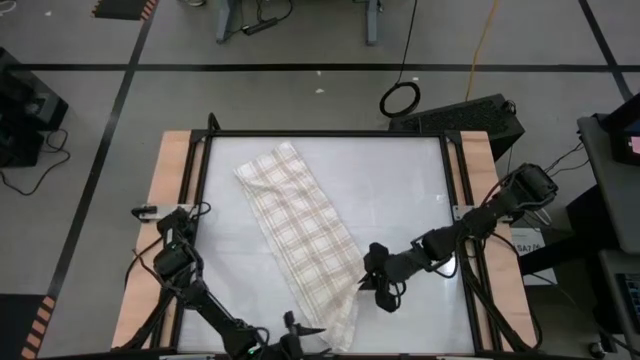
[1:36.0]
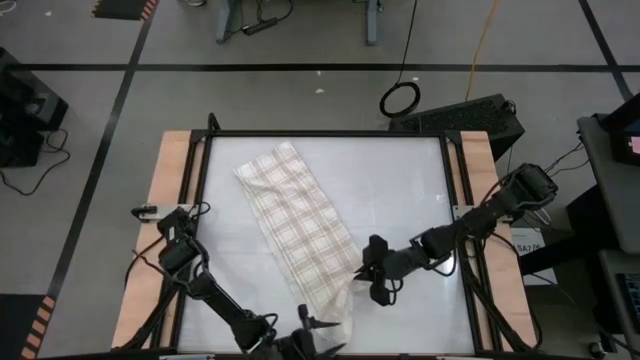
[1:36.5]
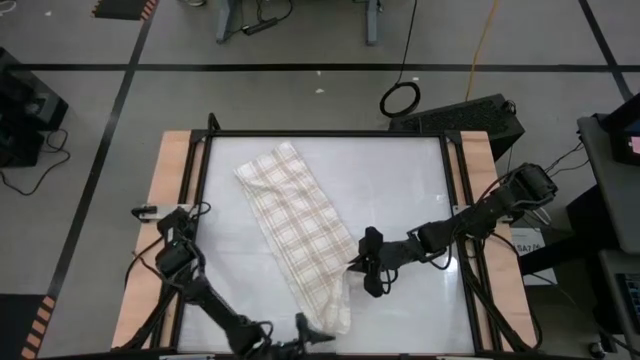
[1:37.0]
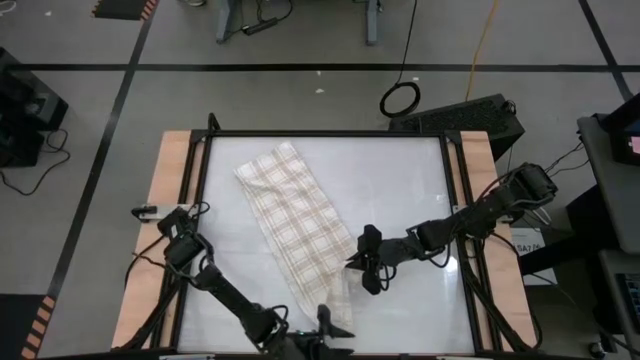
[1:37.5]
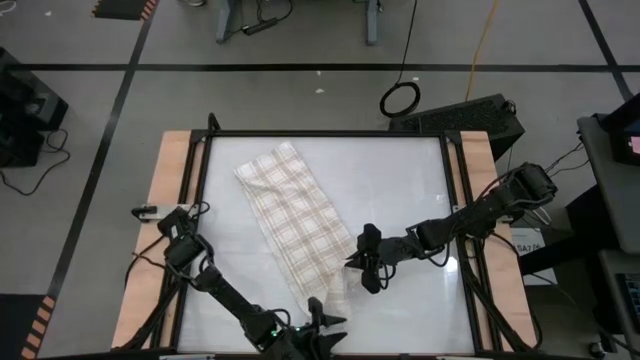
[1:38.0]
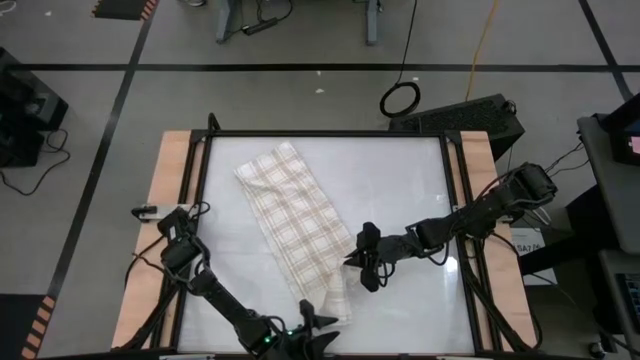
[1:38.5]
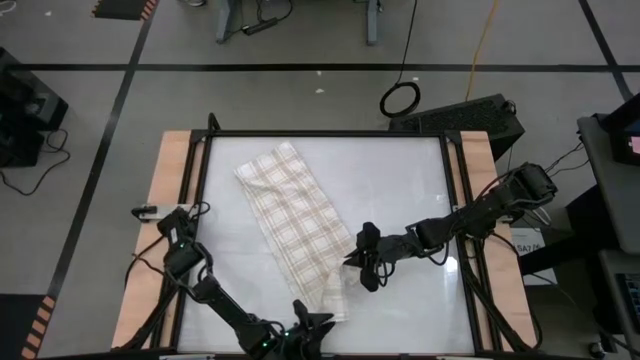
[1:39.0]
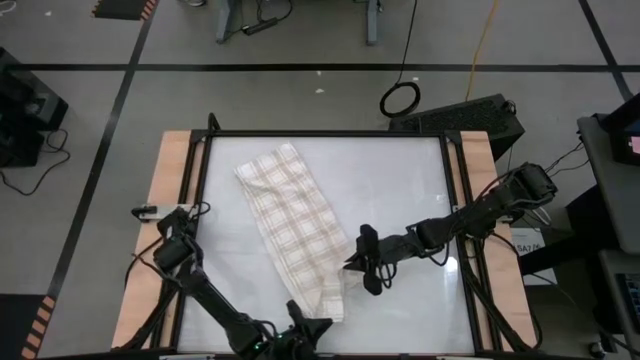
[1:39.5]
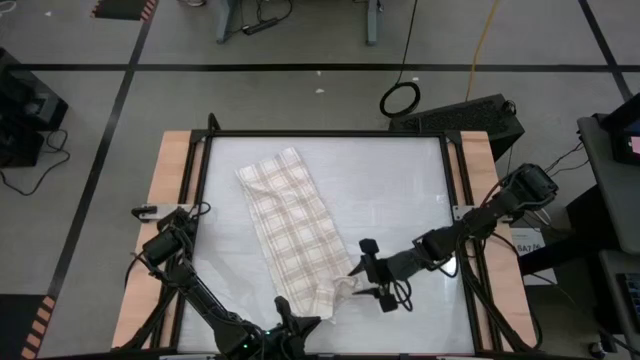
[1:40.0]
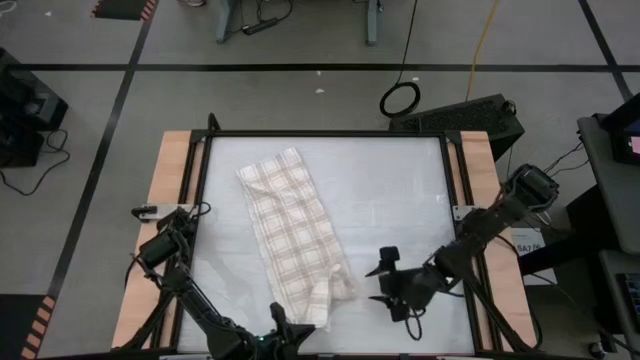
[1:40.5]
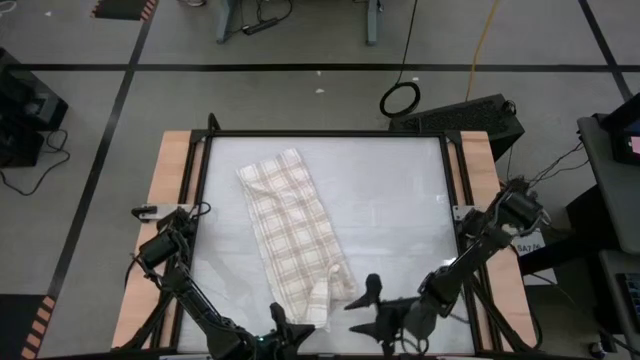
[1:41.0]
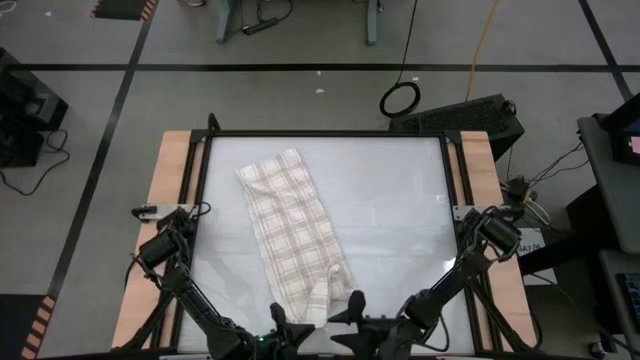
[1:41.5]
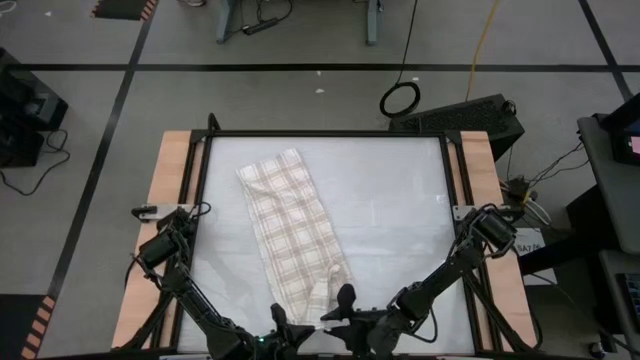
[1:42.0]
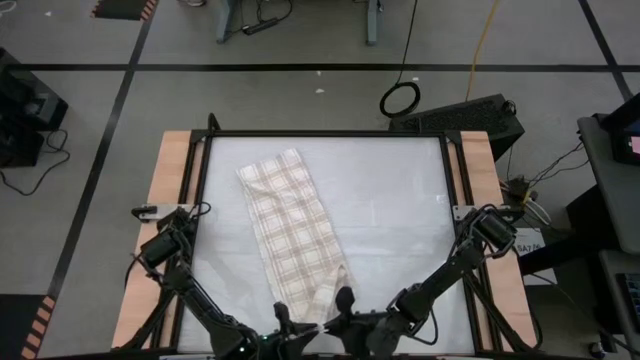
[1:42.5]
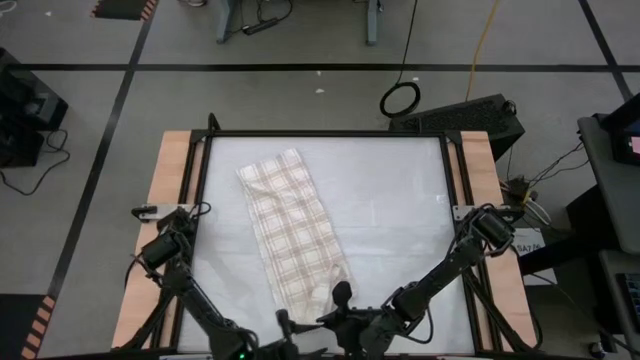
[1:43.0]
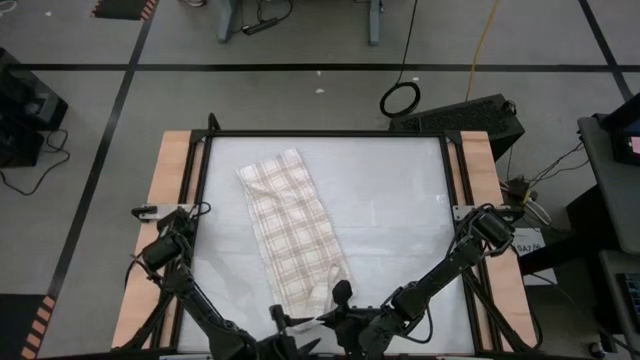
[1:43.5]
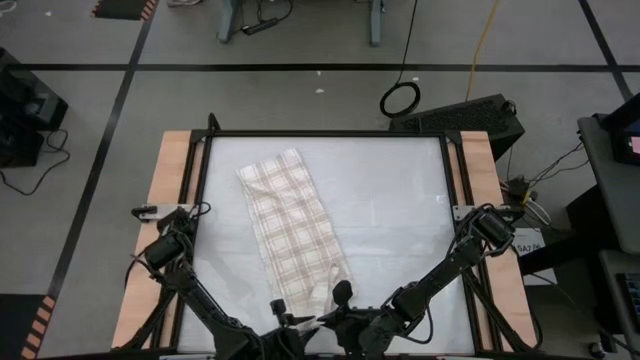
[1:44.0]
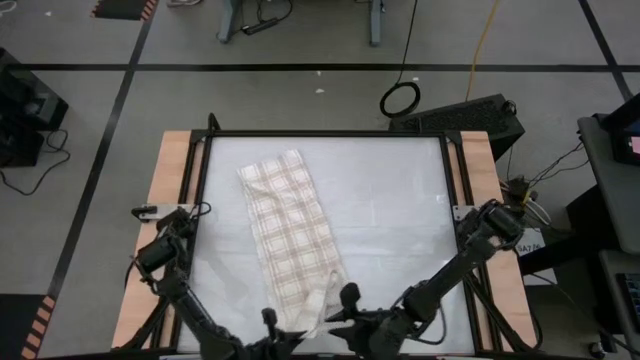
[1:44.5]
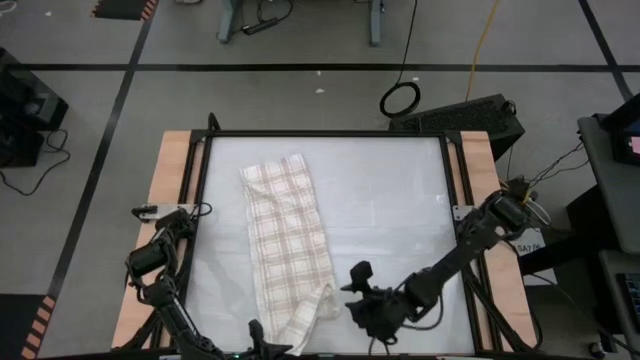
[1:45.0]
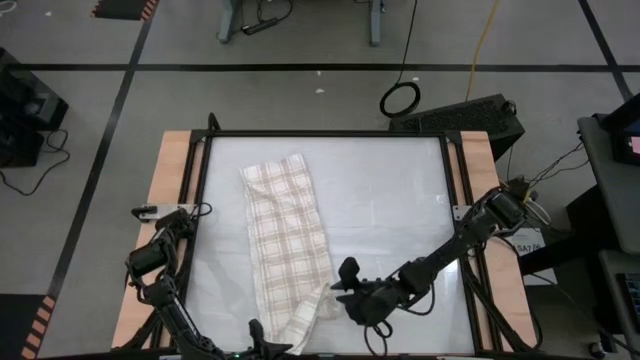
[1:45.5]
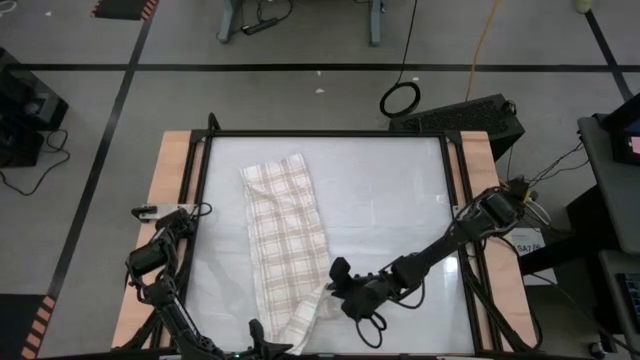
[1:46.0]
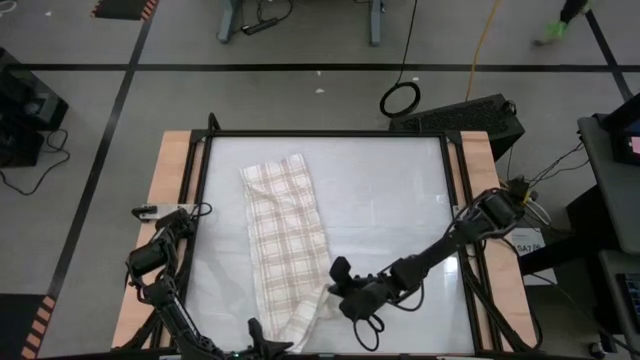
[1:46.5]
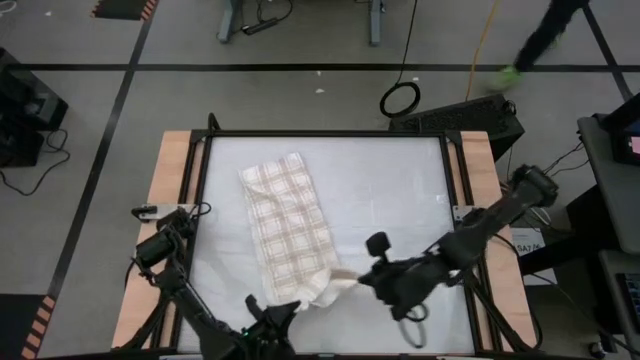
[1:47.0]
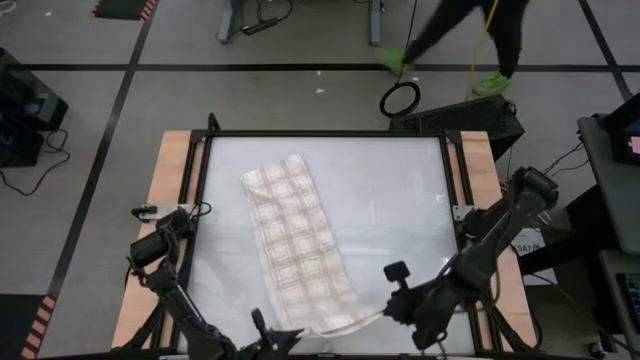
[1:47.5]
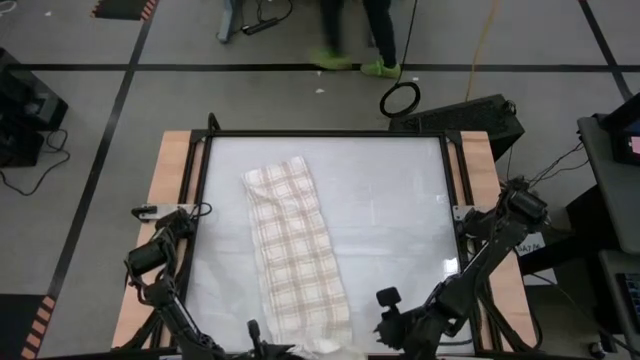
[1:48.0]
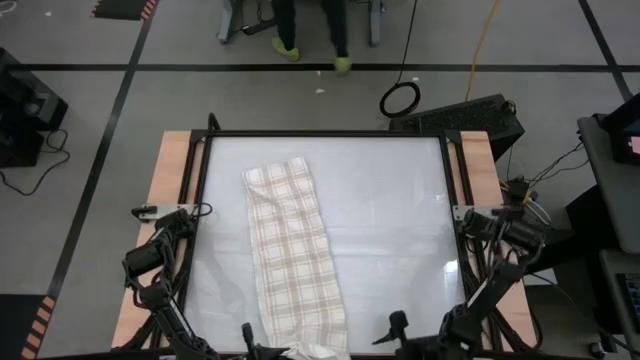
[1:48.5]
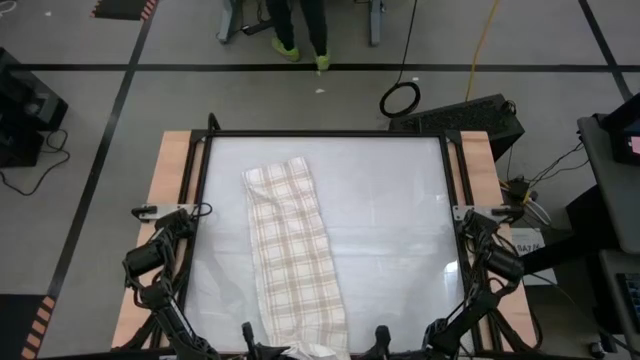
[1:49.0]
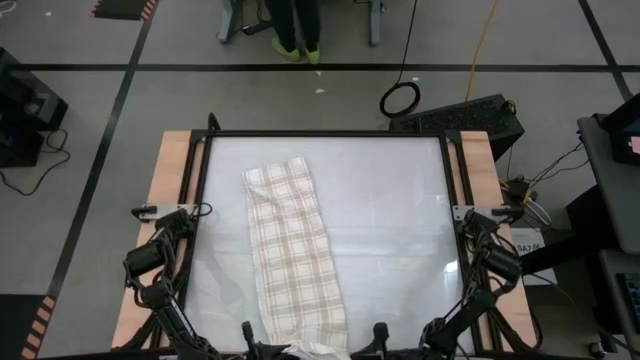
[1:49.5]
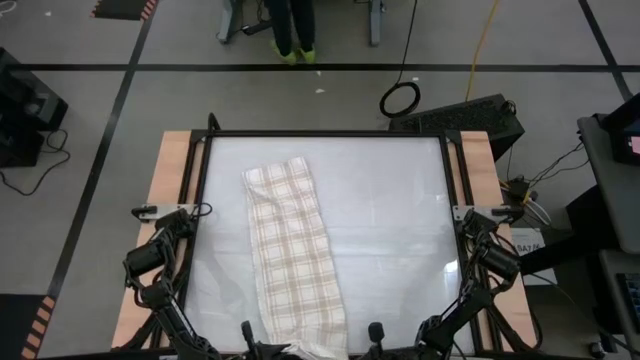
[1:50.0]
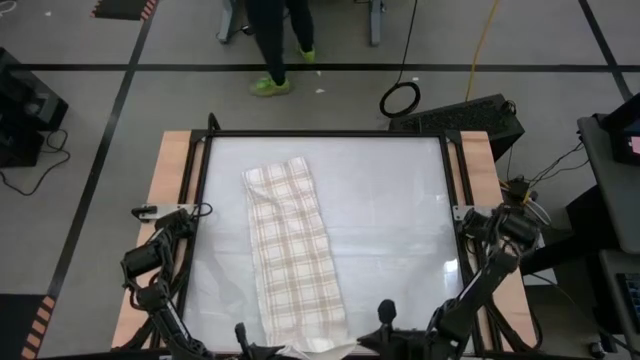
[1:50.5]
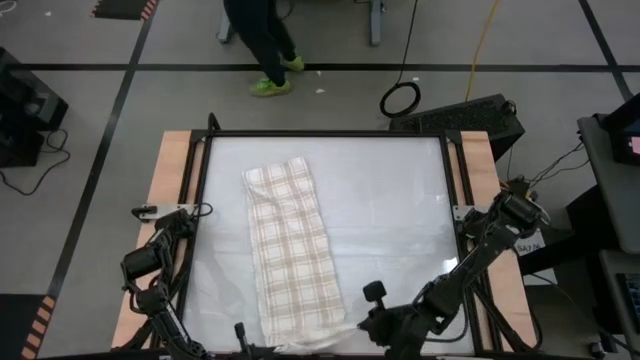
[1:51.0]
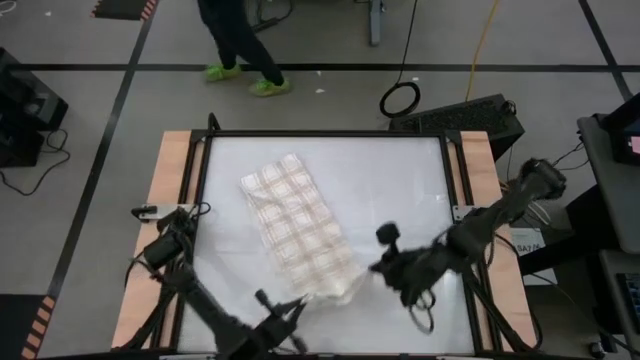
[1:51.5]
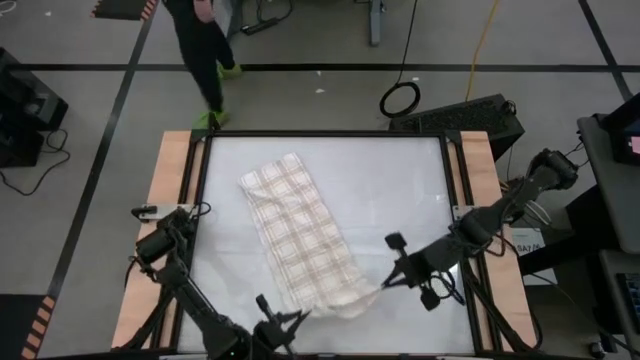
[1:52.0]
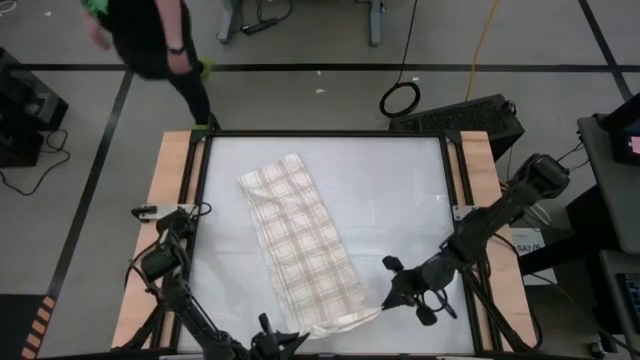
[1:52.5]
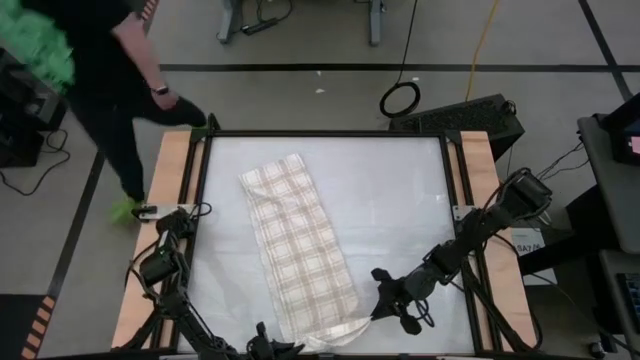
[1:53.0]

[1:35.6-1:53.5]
Task: Roll towel
Roll the white-brown patterned towel

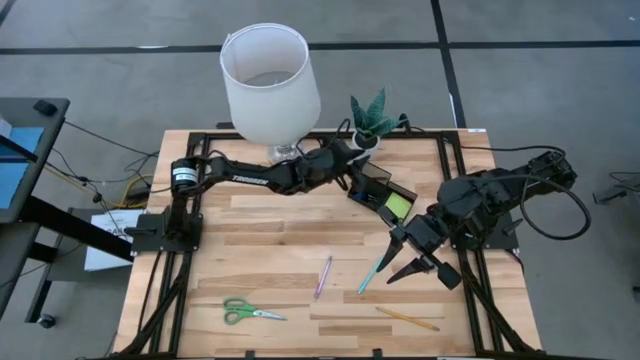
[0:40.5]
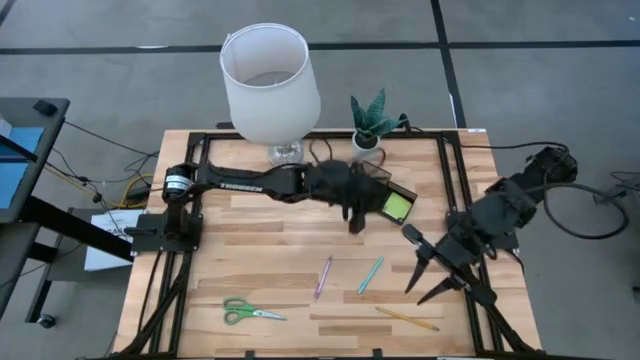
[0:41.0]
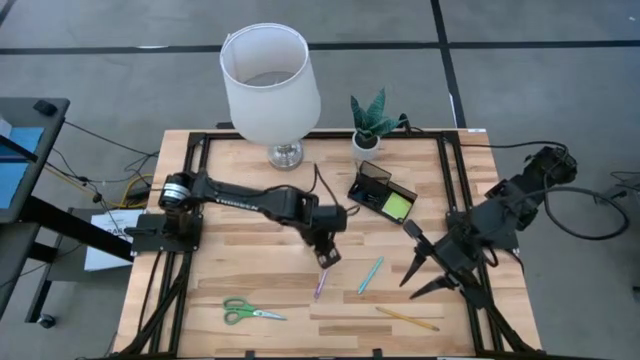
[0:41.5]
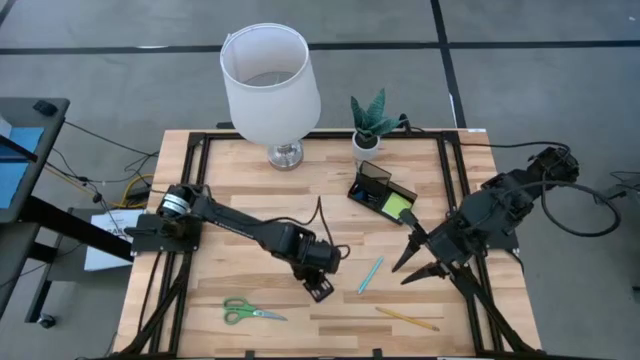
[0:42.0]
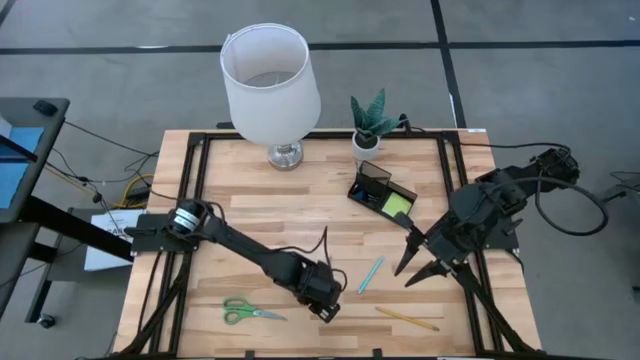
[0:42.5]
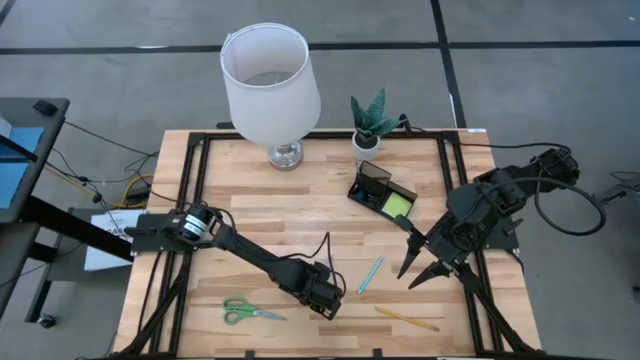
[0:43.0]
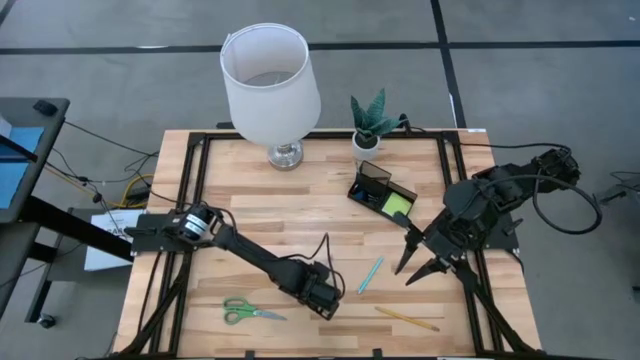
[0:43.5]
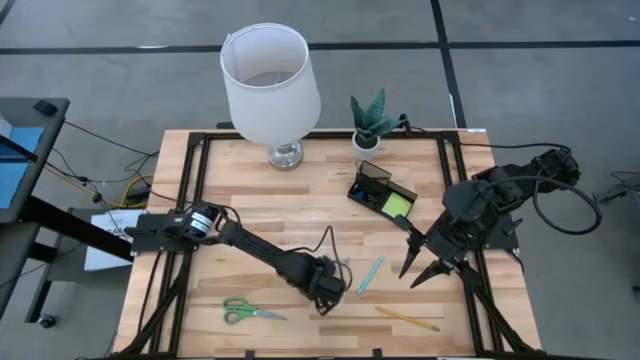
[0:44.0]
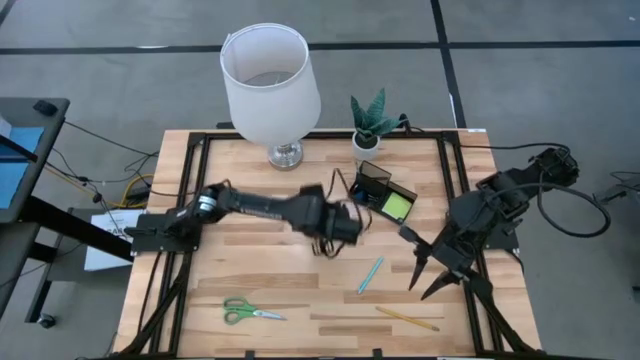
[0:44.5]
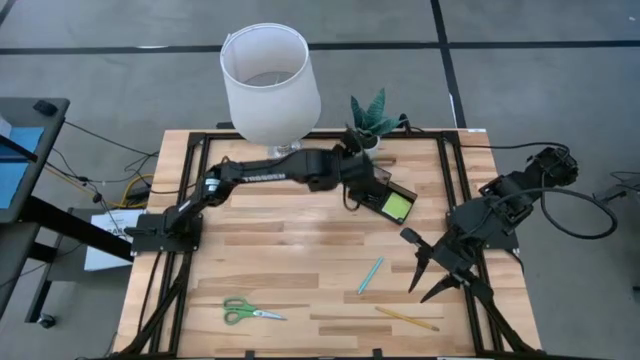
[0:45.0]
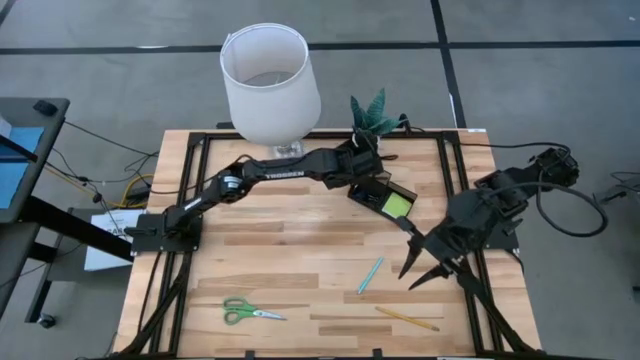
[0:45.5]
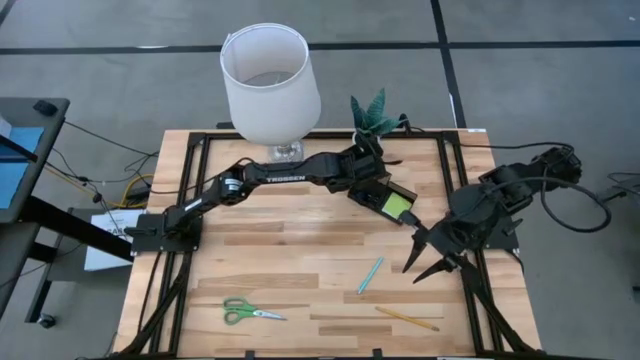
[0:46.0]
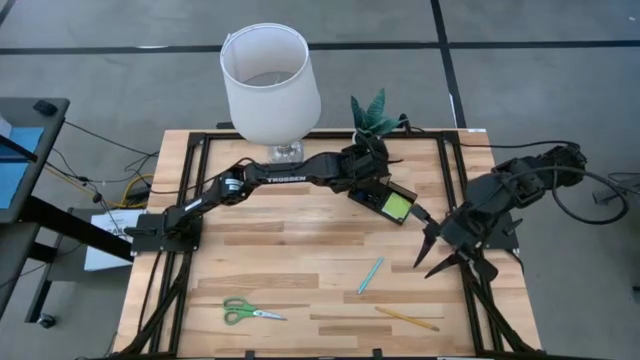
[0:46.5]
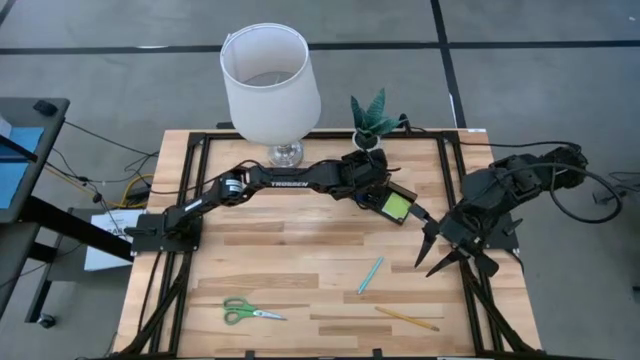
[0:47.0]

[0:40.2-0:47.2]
Task: Pick and place office supplies into organizer
Put the purple pen into the black organizer
